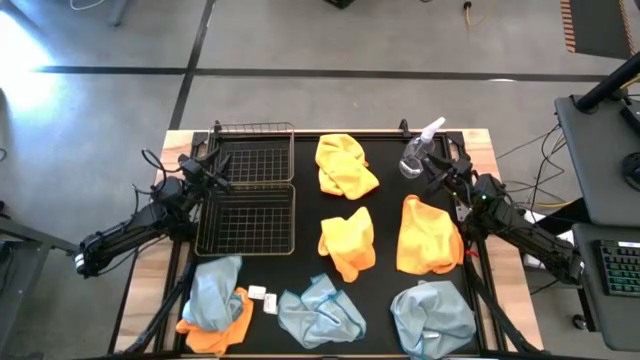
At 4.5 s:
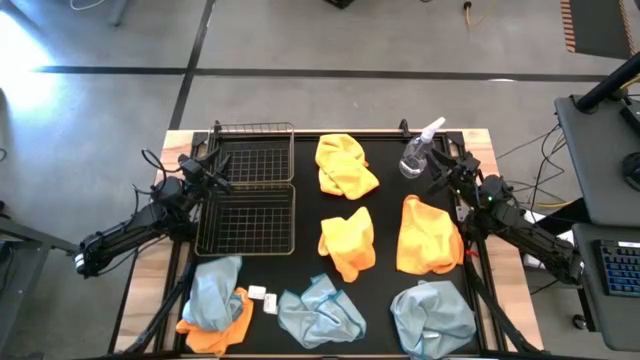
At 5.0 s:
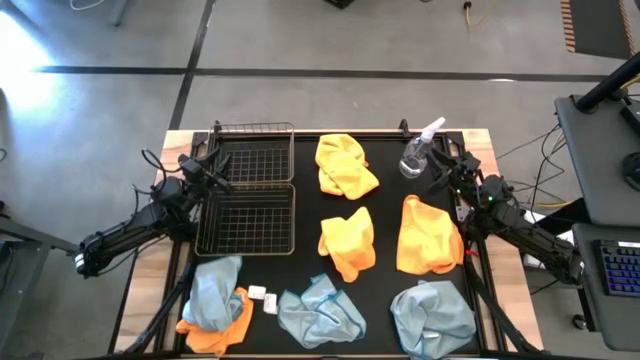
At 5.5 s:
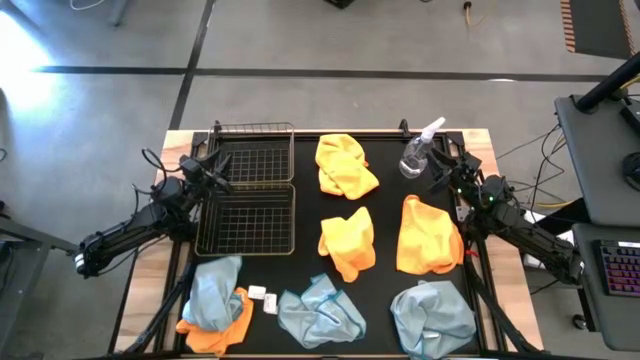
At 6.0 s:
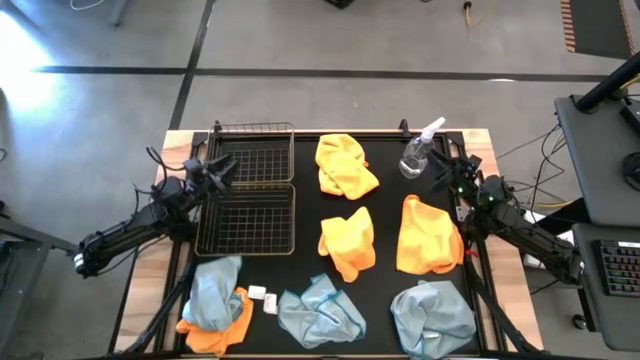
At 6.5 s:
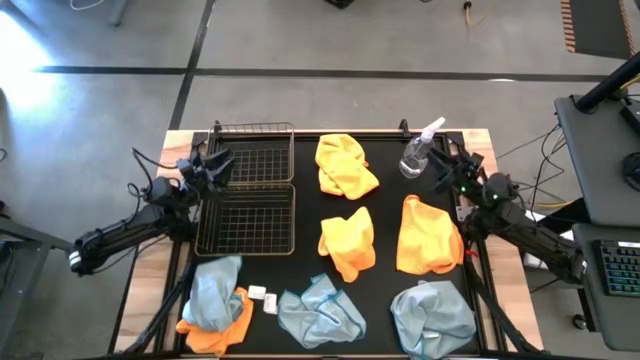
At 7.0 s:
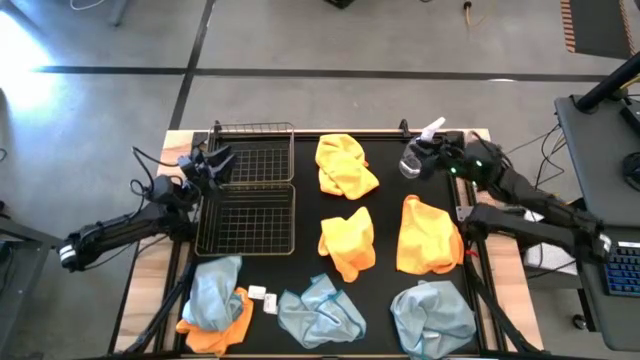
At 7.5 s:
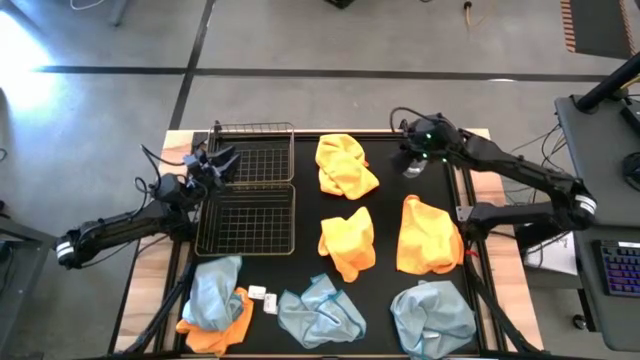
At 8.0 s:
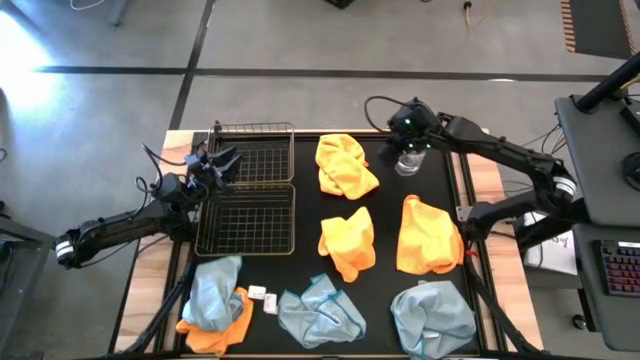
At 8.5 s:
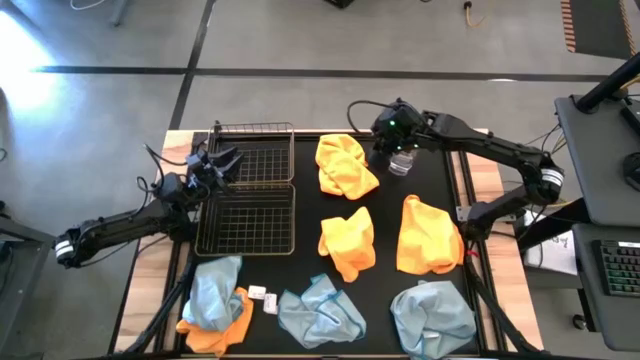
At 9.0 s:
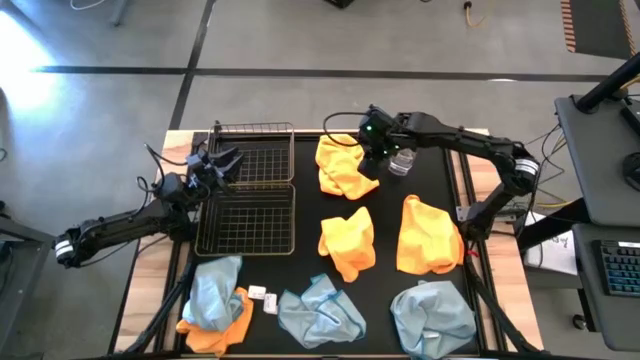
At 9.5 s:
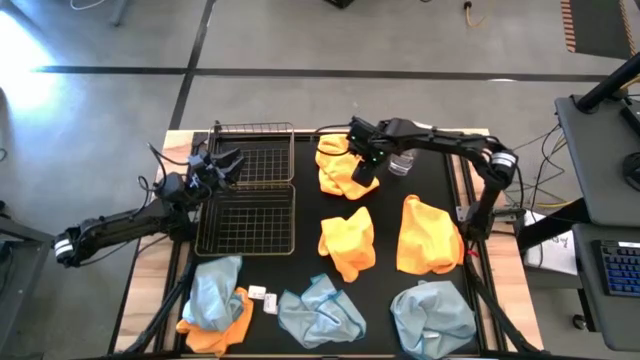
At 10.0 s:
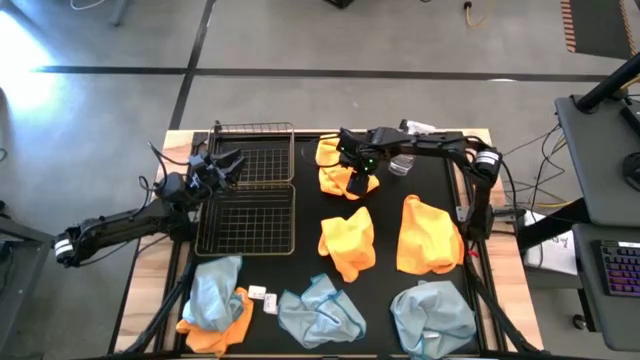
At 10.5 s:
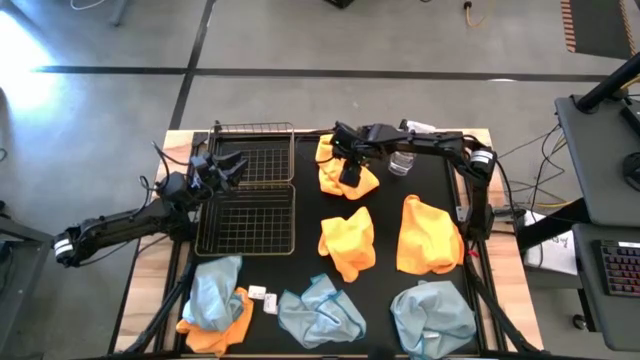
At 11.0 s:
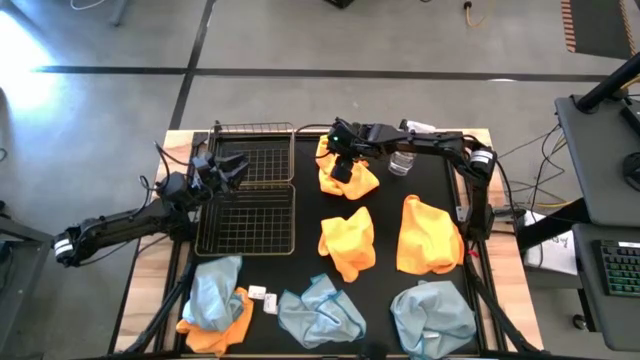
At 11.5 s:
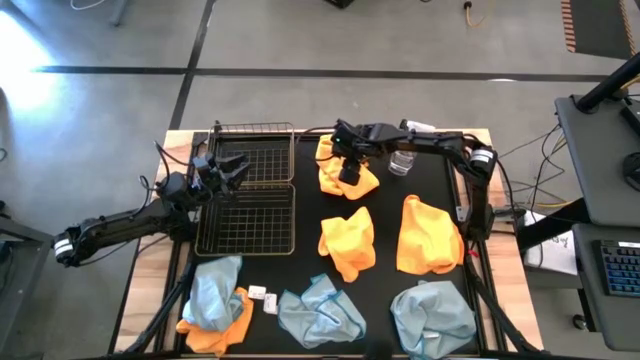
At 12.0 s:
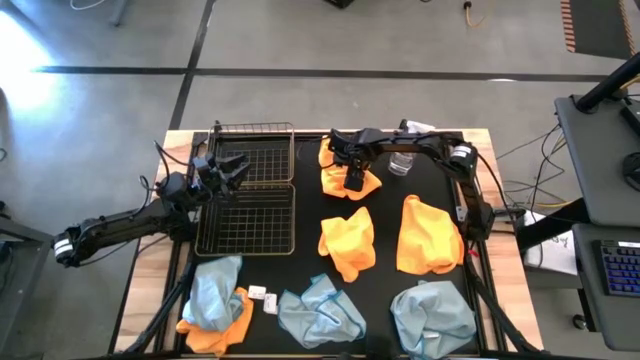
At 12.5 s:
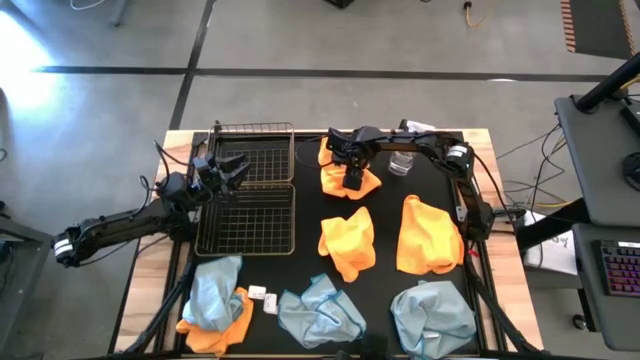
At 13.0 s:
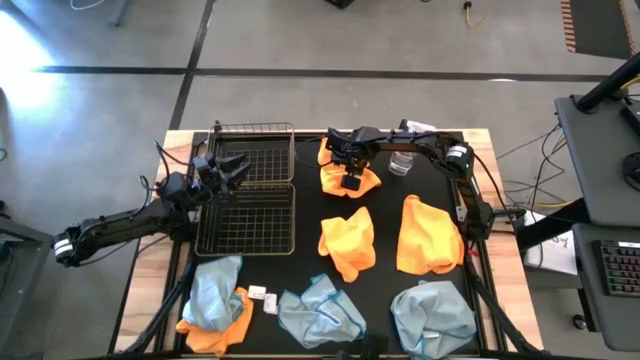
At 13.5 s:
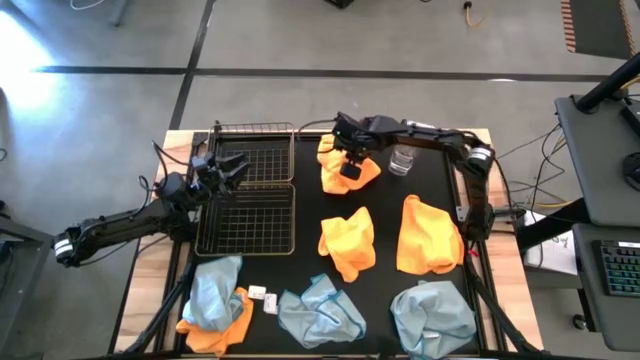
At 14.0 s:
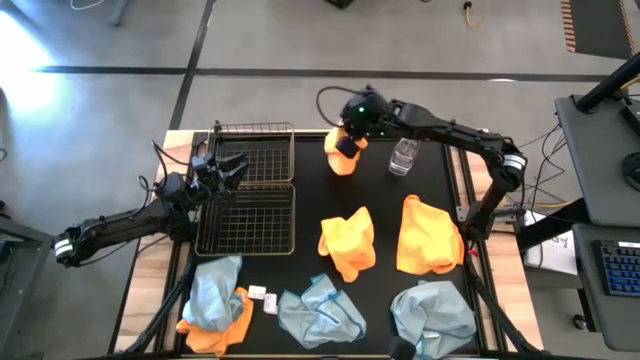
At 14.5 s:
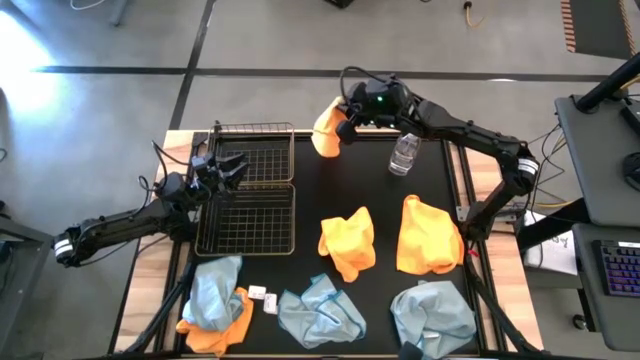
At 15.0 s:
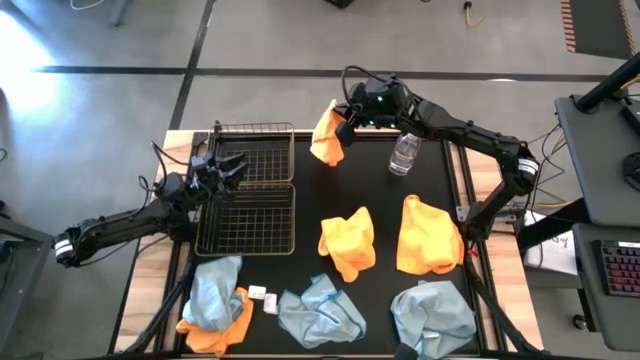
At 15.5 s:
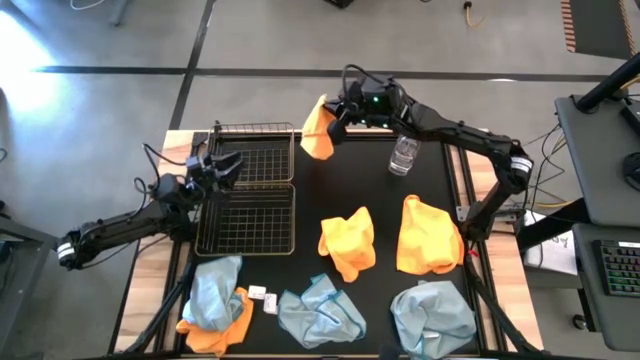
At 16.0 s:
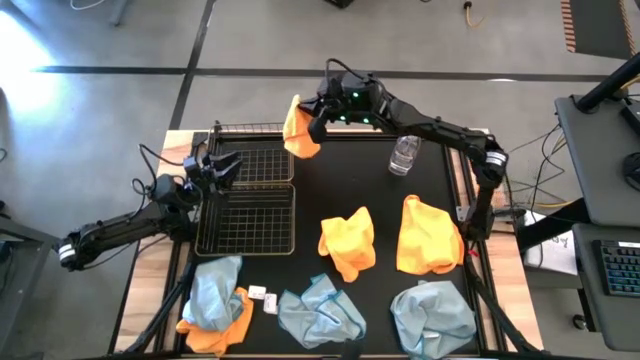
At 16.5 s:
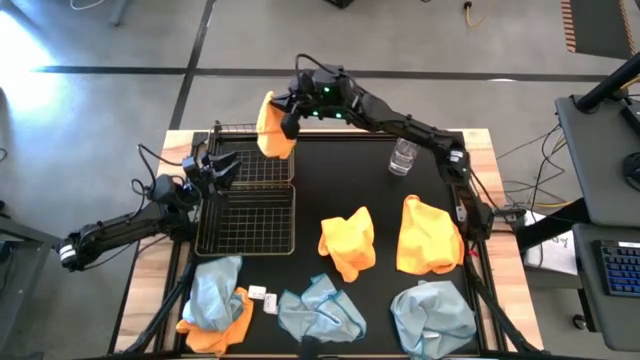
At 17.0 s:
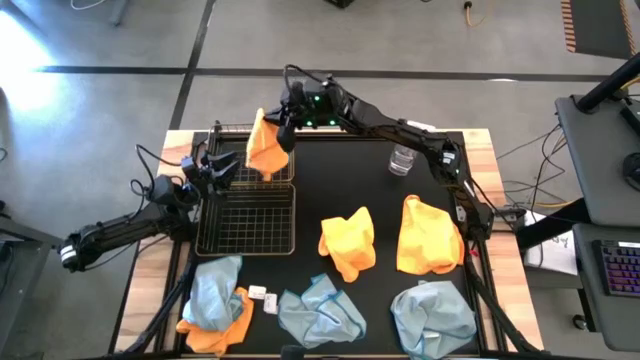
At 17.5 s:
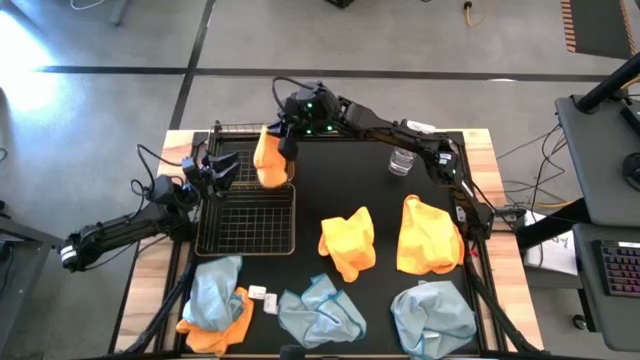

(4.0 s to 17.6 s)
Task: Sort microfiber towel by color & place in baskets
Put the top center orange microfiber towel into the top wire basket

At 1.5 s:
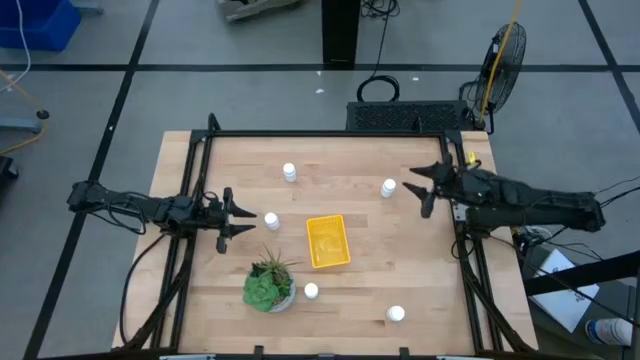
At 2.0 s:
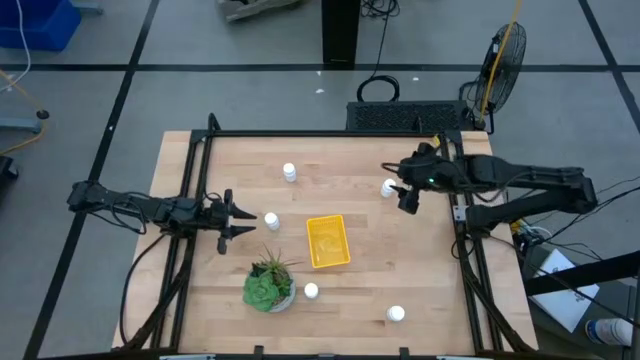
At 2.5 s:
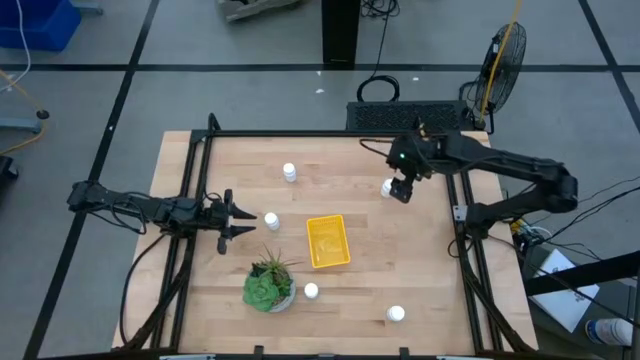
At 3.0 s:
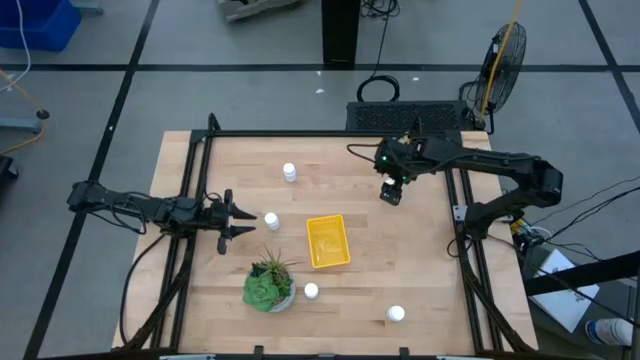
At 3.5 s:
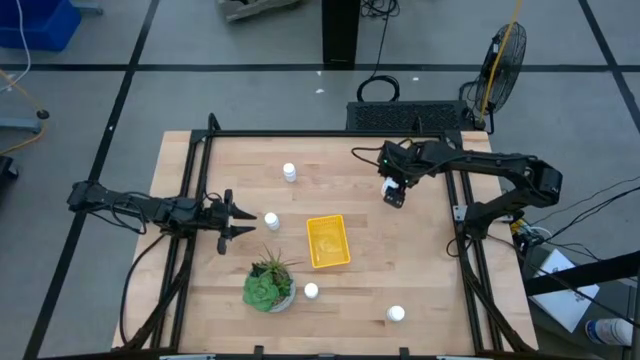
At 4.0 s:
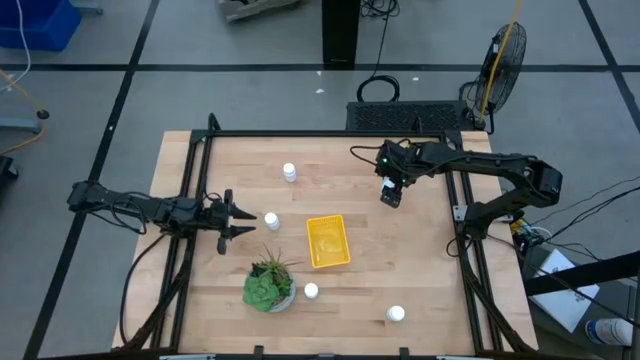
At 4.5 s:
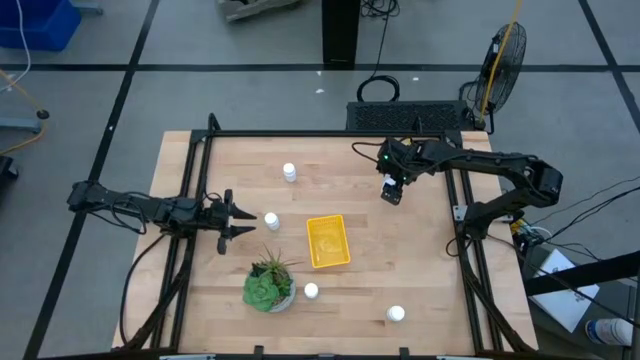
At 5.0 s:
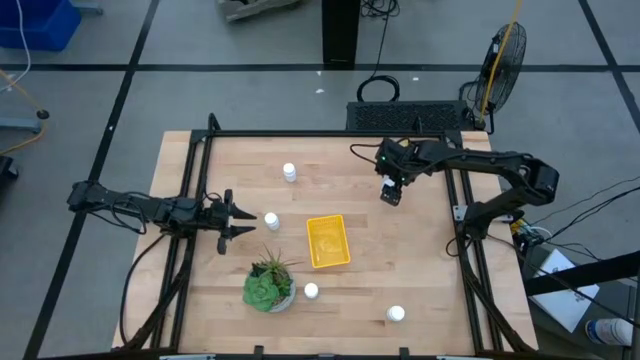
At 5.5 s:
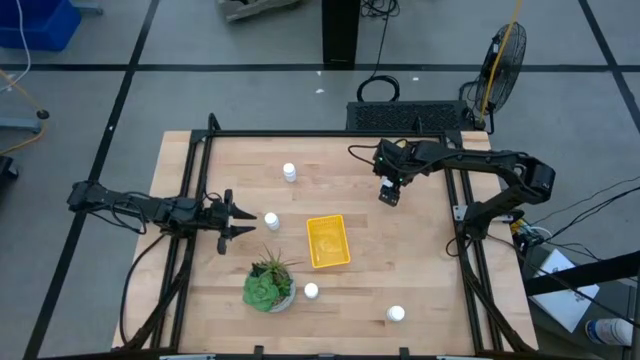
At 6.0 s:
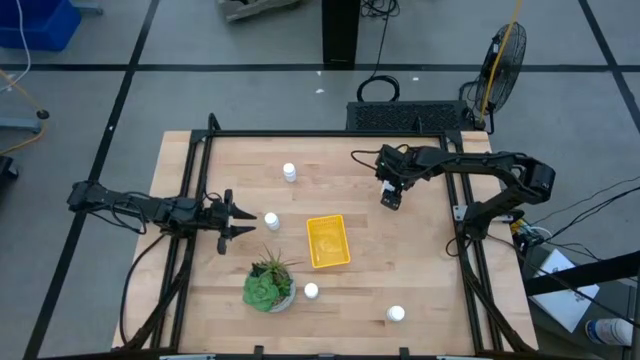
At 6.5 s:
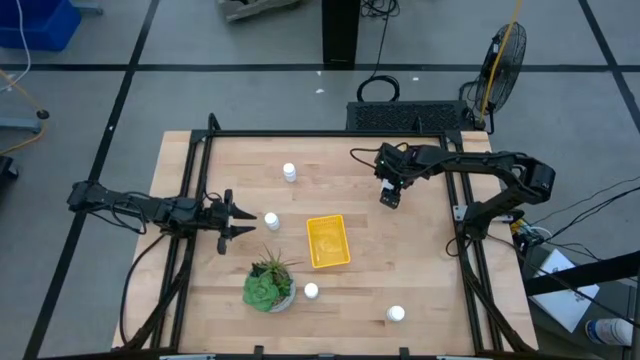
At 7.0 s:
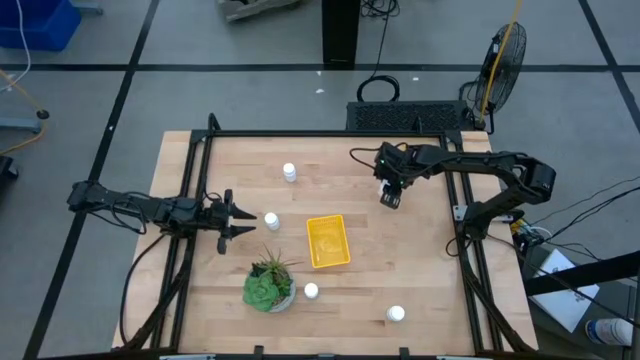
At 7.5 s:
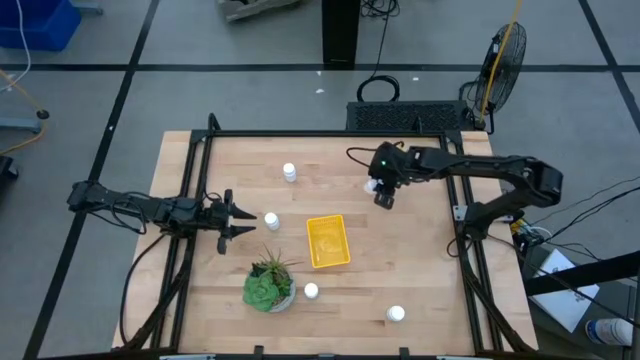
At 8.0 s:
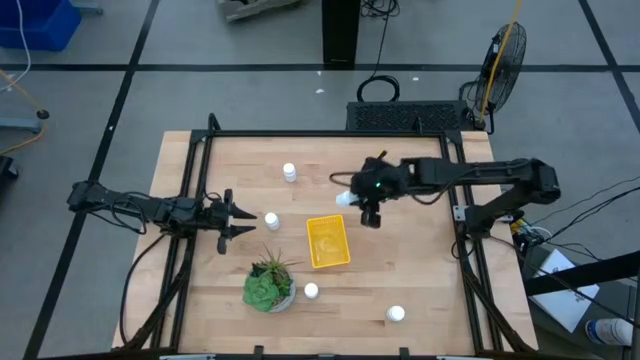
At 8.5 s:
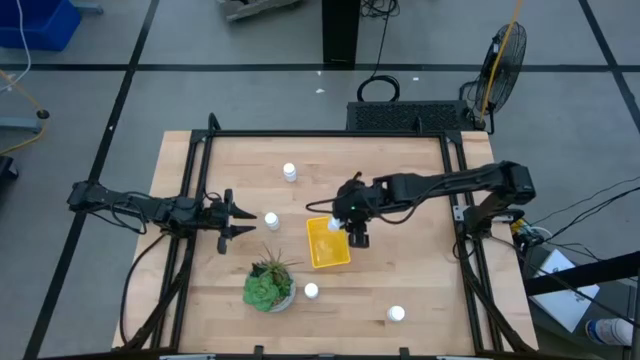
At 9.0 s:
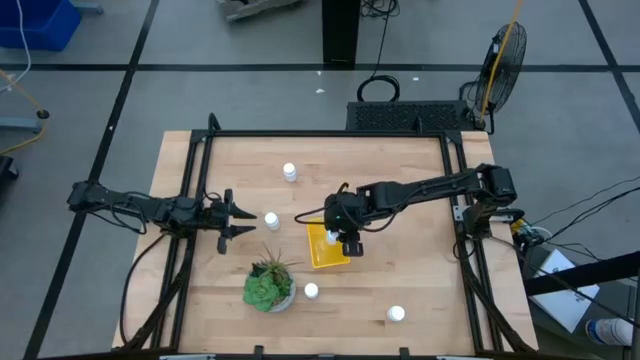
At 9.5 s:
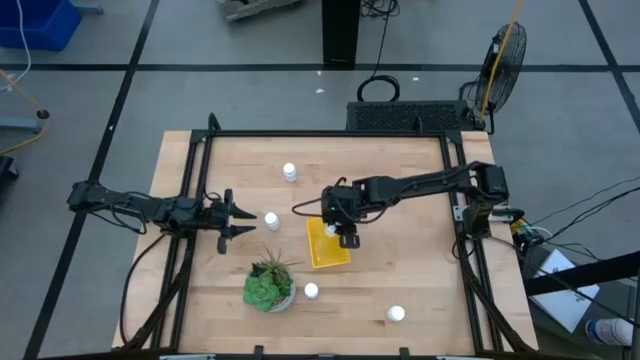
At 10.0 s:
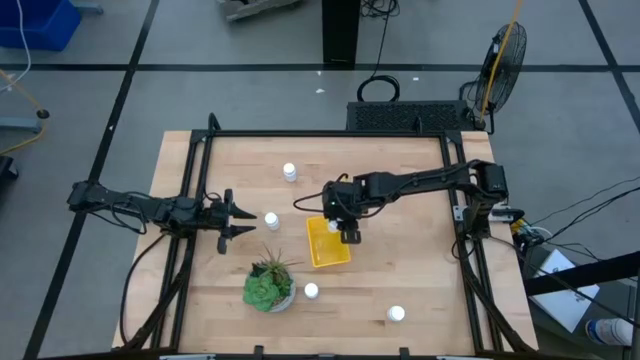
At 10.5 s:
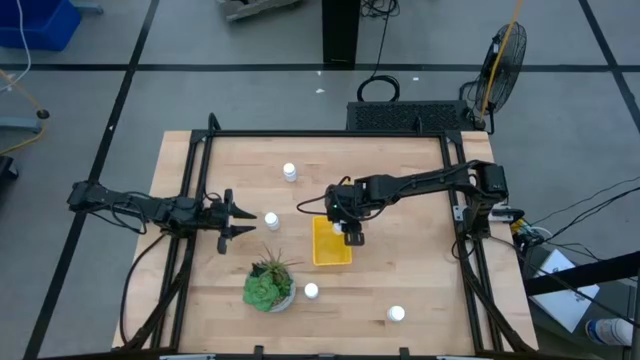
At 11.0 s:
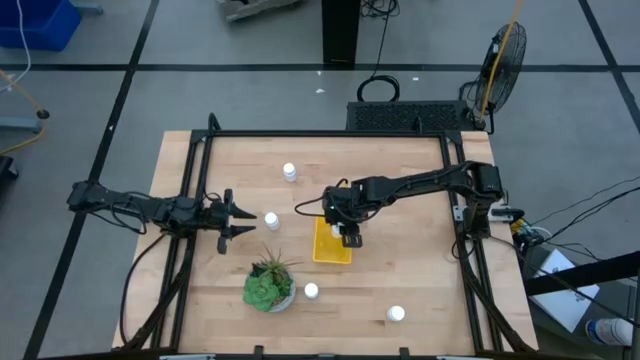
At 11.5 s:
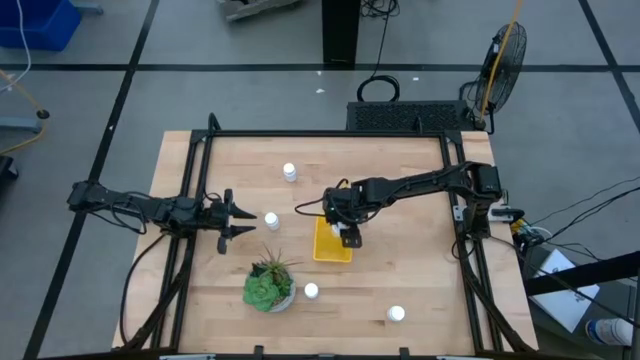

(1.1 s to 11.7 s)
Task: Pick and place pill bottles into a basket
Put the white pill bottle into the yellow bin
